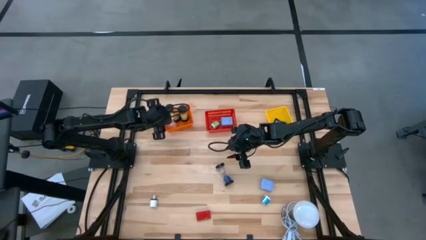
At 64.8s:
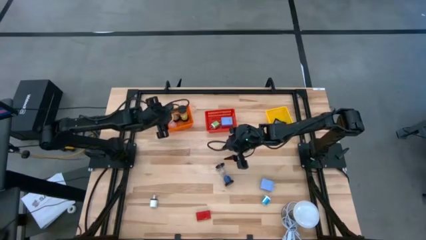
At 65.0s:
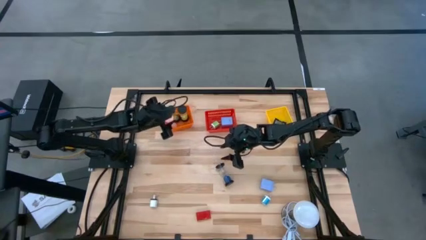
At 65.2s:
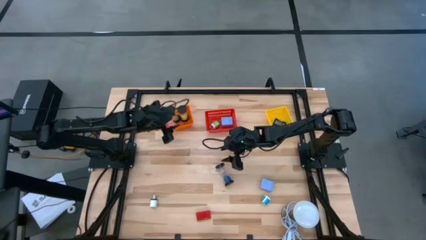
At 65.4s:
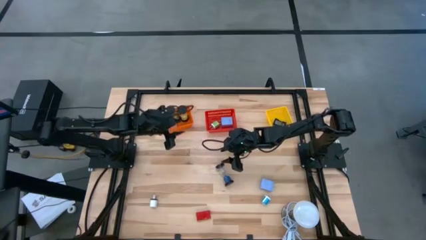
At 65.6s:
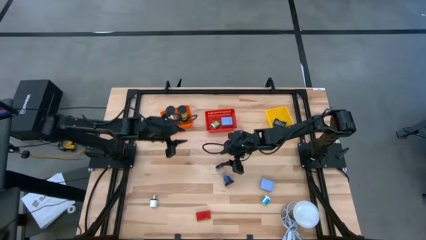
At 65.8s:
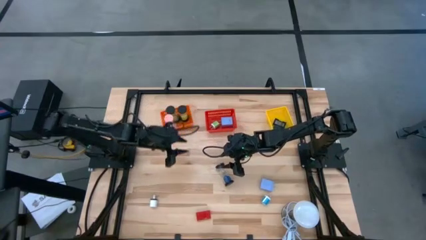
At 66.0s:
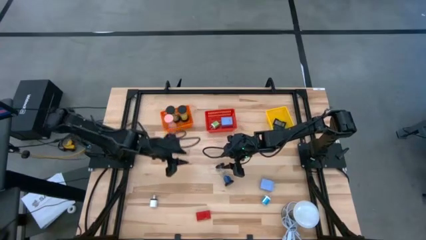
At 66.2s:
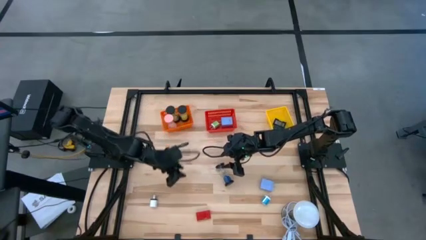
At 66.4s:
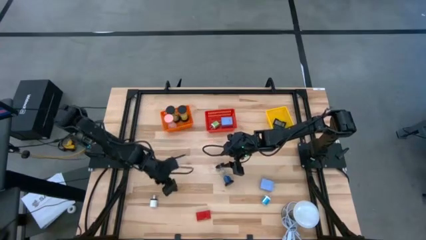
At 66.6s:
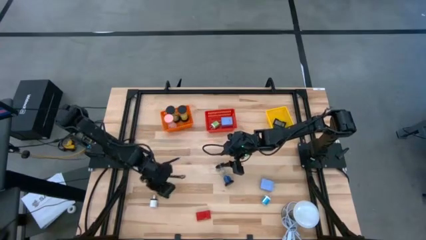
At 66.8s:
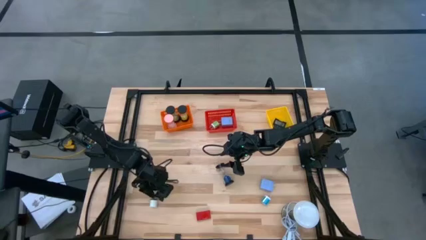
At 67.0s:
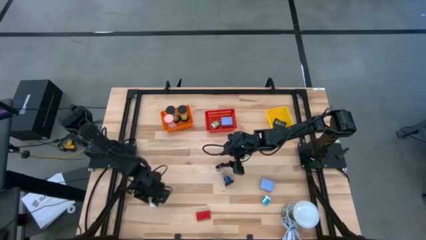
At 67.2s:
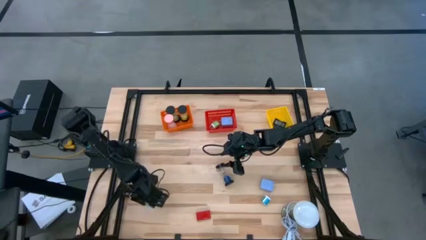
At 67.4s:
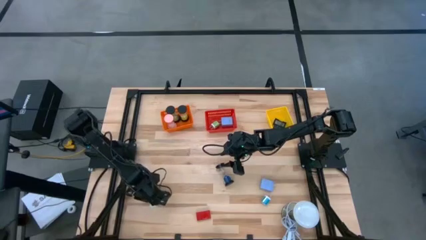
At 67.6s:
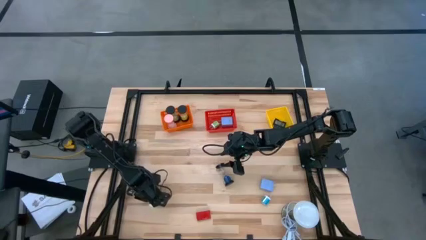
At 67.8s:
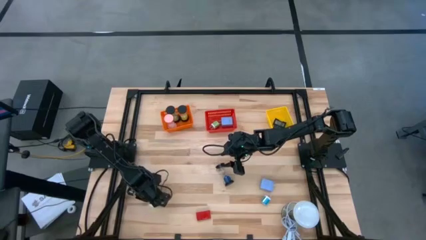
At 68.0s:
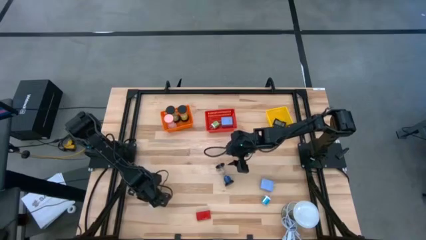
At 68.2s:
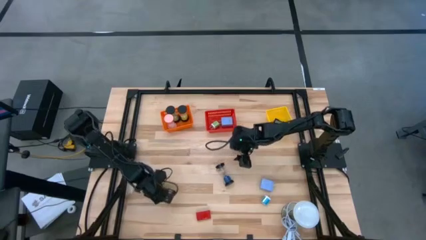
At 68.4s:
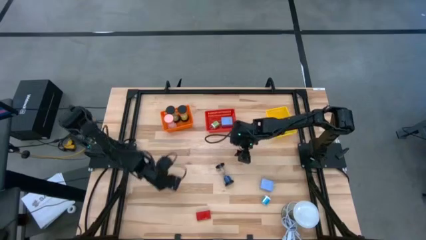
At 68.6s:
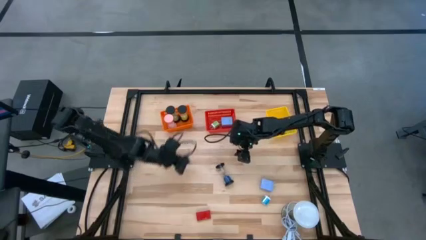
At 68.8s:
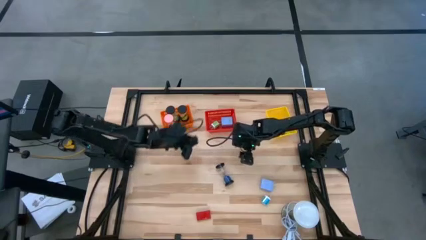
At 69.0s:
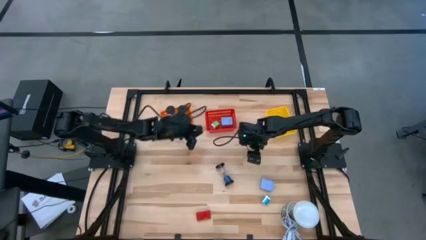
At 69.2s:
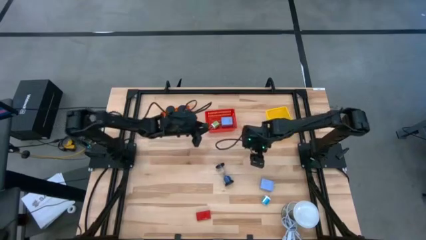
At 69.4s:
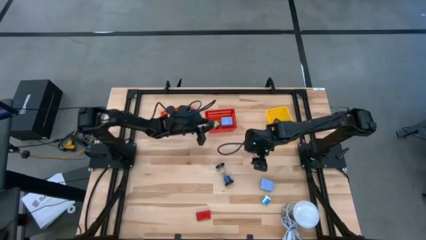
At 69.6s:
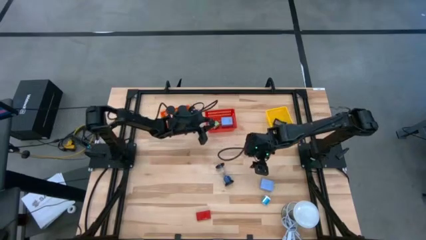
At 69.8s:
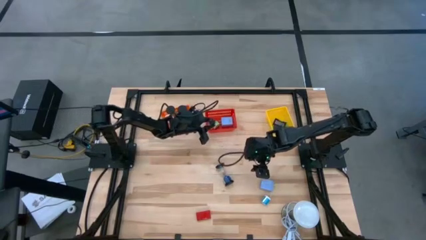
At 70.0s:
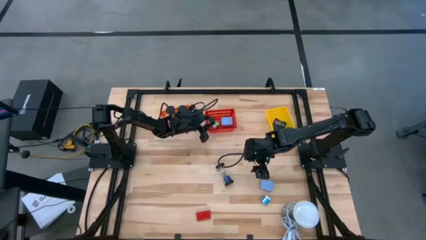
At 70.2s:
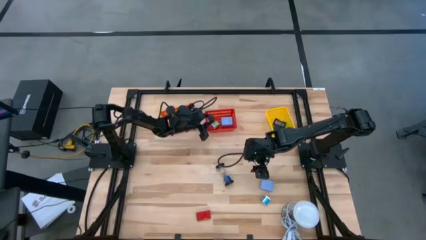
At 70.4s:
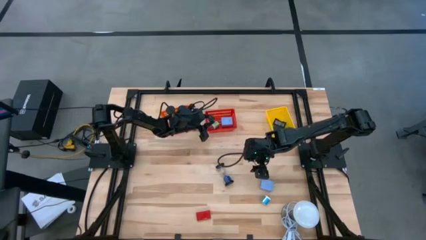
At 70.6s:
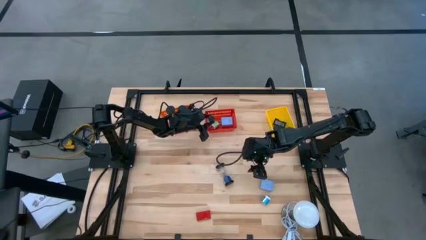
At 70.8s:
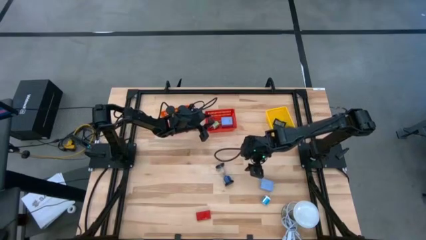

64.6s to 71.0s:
Task: Pick & Place Office items
Put the white charger adapter into the red bin

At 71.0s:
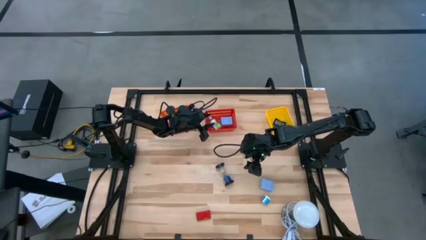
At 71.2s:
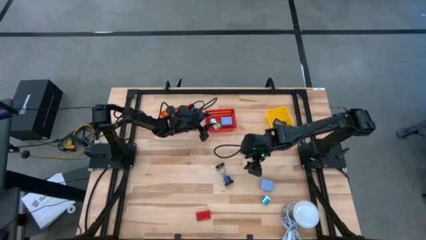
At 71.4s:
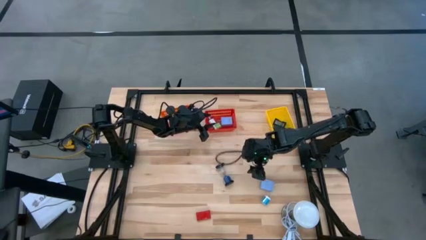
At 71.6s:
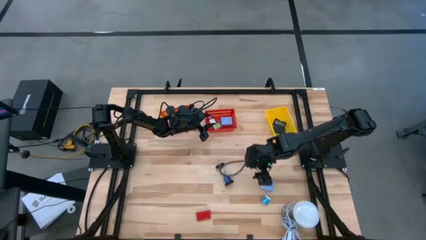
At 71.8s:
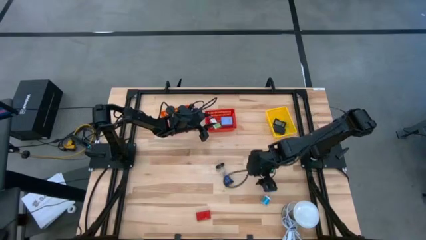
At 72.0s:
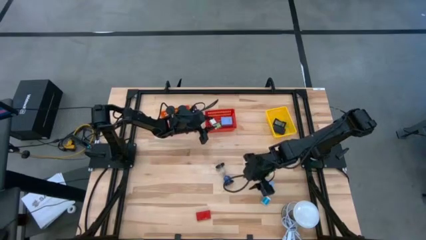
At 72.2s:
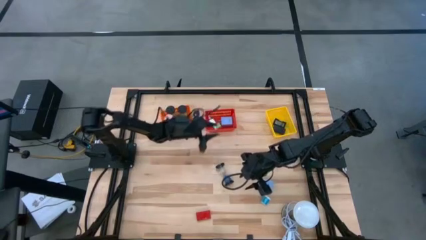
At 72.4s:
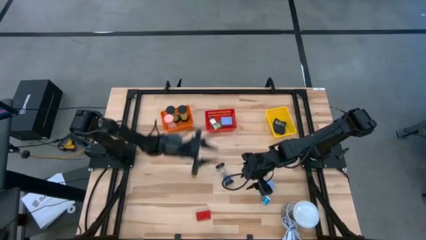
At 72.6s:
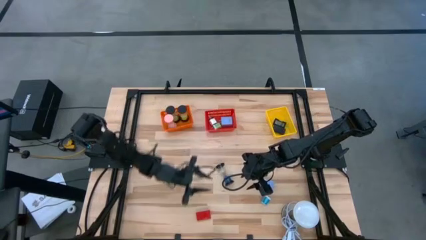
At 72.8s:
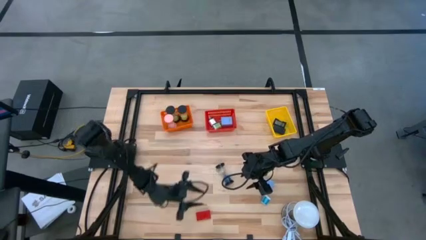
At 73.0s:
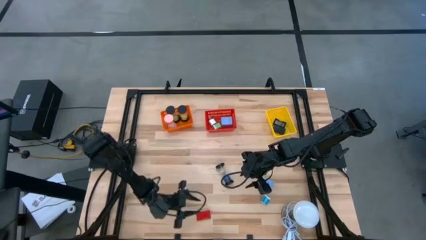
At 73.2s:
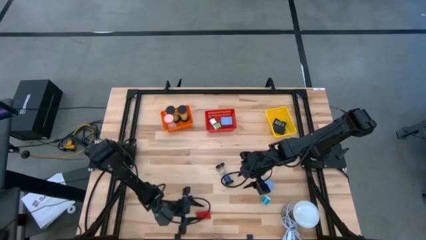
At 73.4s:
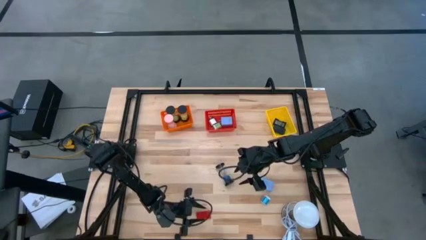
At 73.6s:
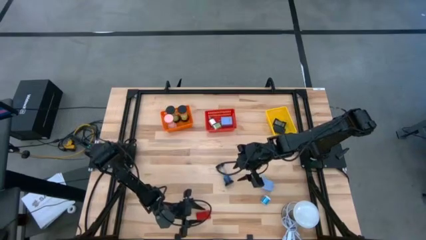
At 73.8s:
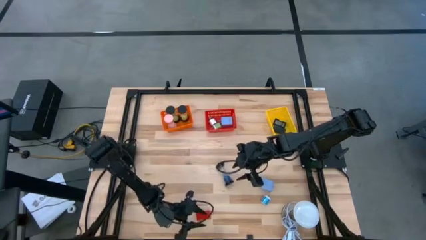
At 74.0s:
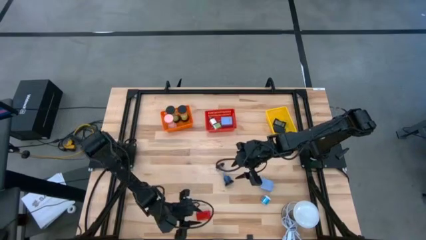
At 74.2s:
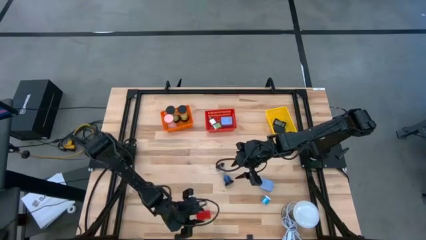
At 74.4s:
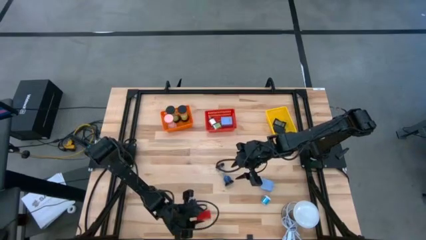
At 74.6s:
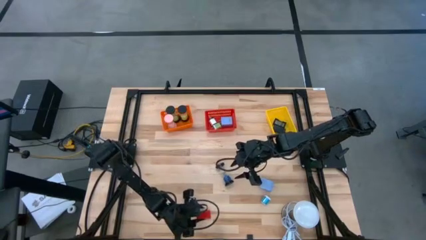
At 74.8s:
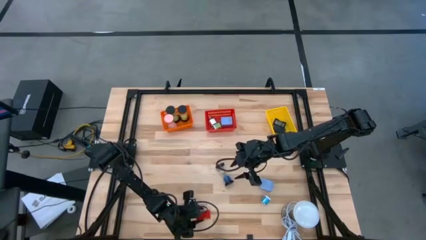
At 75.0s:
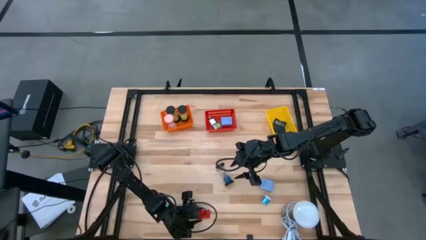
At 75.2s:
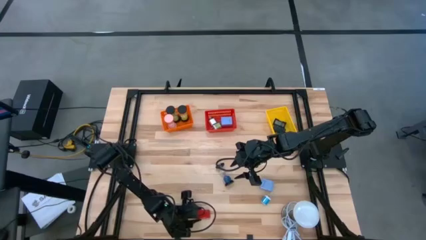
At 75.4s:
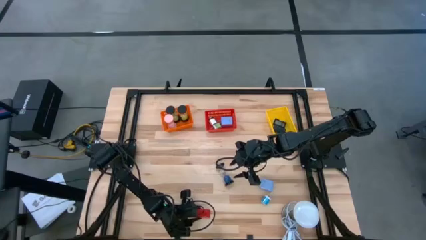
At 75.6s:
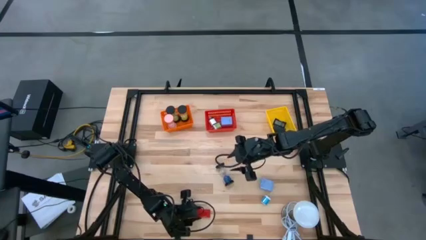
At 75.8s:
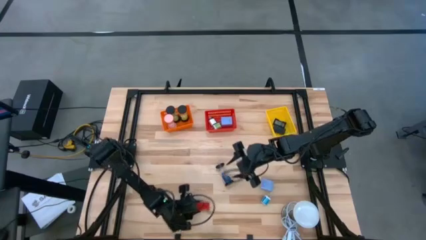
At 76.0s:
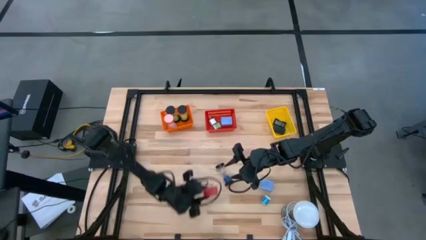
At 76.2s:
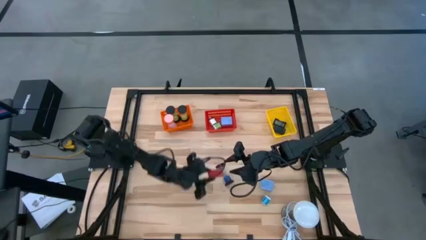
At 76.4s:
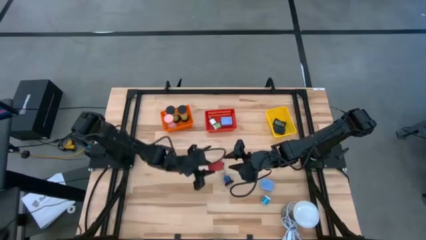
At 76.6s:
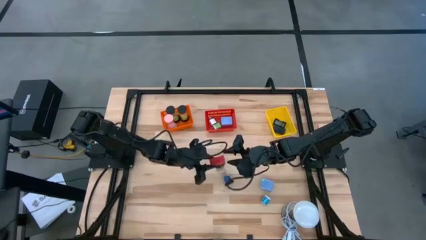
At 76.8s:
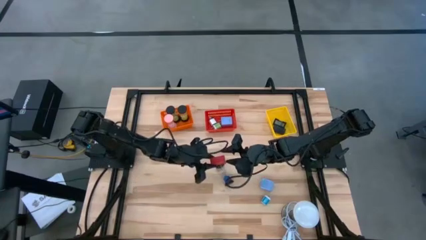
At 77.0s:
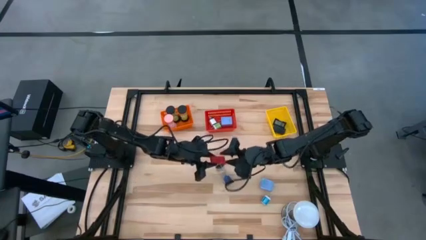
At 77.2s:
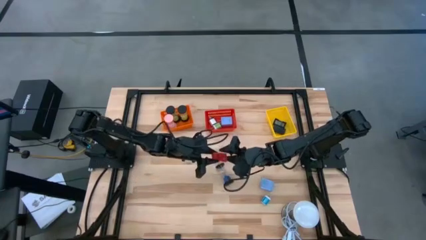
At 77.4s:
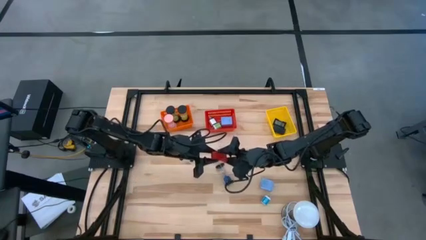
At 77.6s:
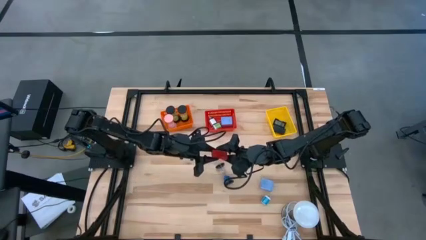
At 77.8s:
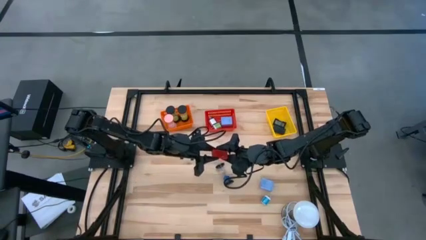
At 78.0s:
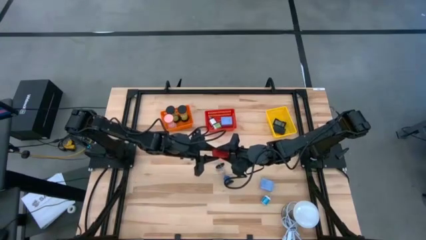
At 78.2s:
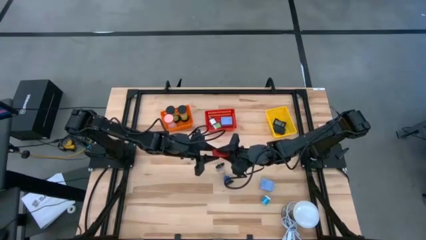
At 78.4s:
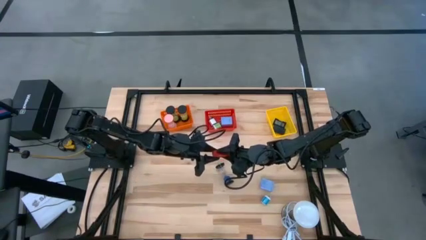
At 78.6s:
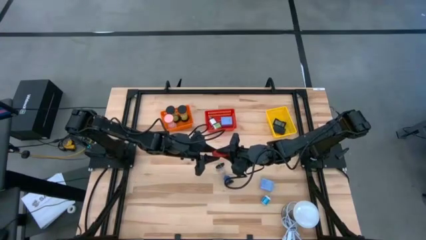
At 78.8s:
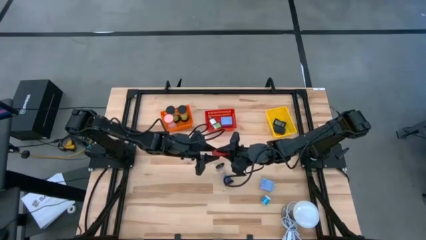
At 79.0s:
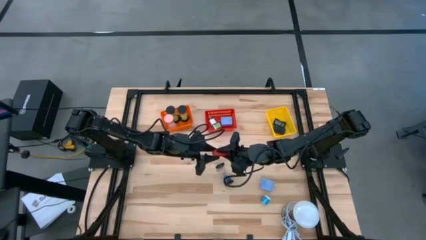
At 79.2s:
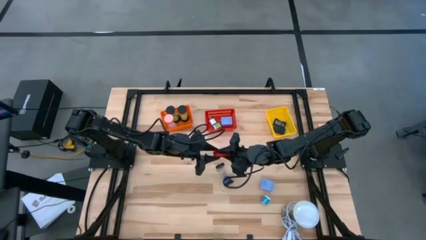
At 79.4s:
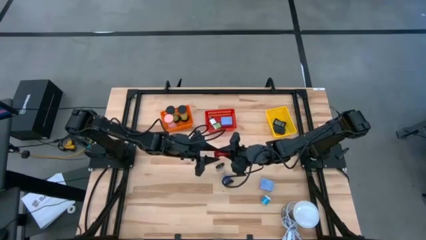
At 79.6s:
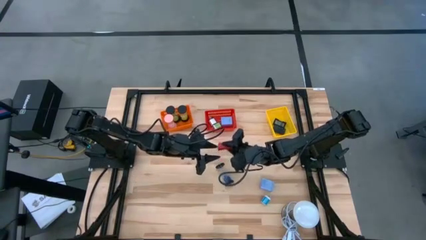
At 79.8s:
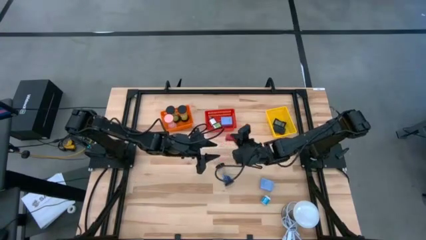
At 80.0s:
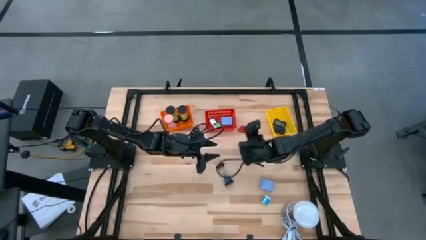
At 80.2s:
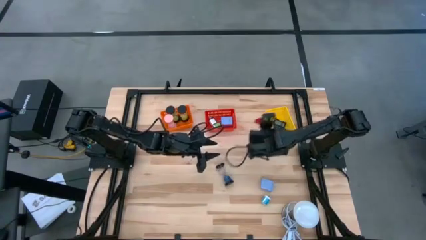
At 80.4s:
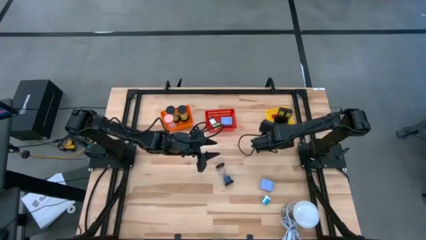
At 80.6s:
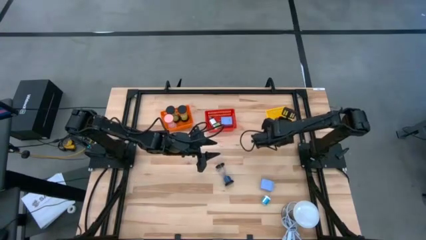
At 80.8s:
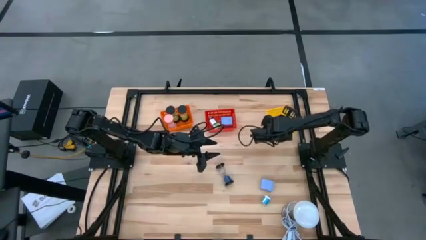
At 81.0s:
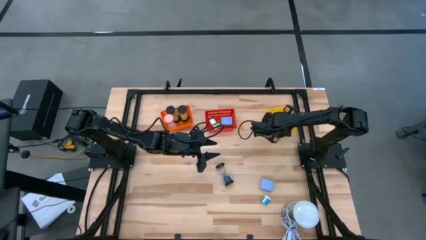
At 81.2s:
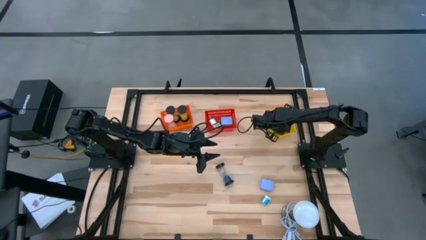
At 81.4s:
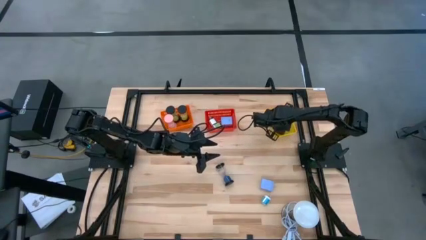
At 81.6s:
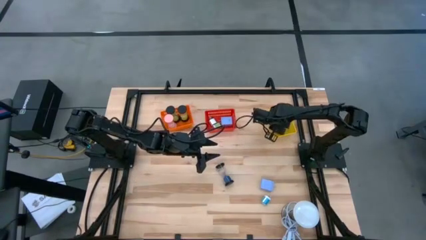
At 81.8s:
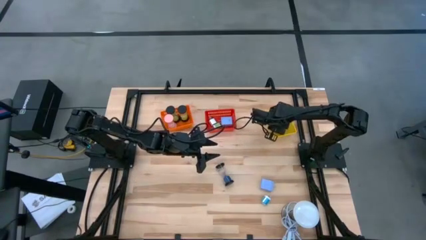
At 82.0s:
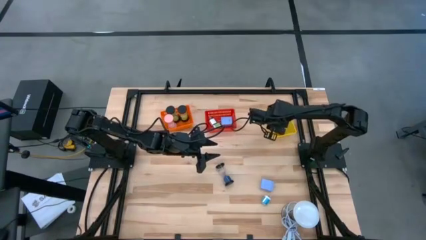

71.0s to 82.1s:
Put the red digital clock into the yellow bin
